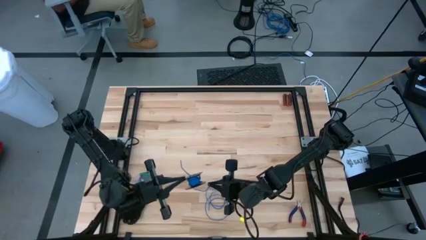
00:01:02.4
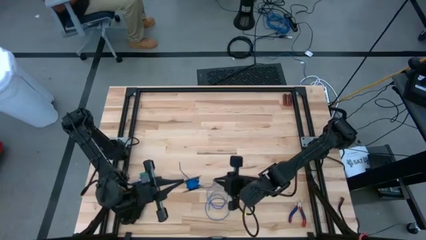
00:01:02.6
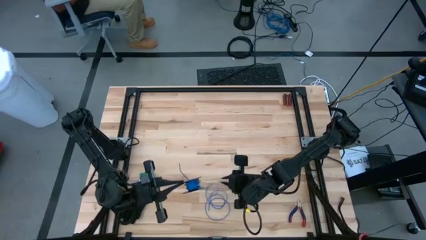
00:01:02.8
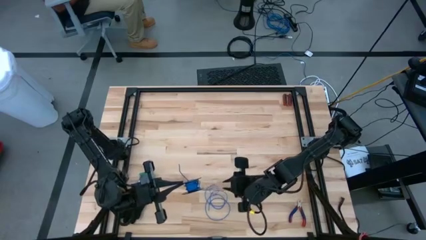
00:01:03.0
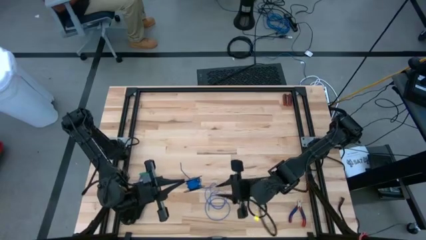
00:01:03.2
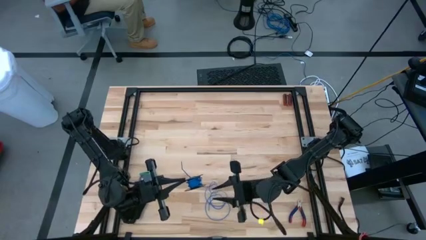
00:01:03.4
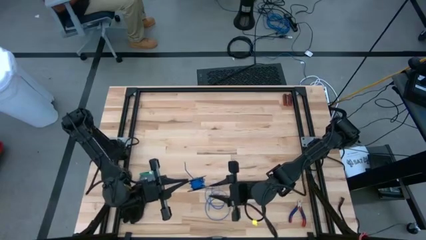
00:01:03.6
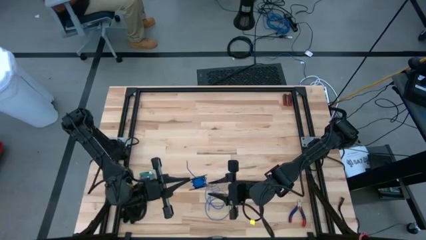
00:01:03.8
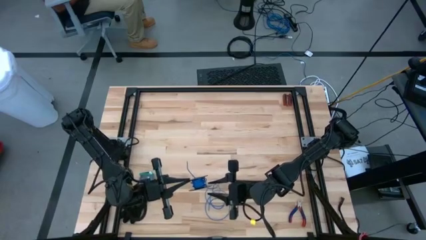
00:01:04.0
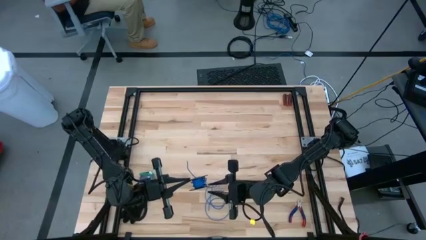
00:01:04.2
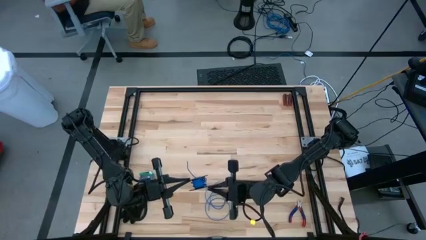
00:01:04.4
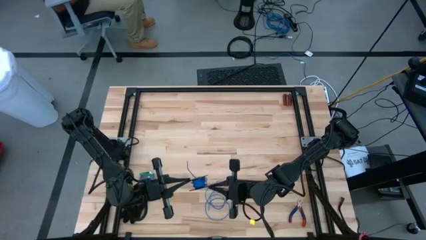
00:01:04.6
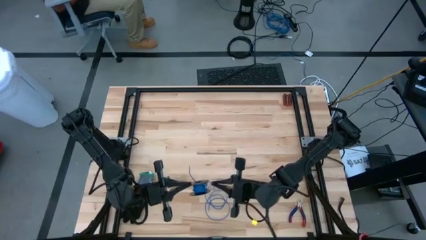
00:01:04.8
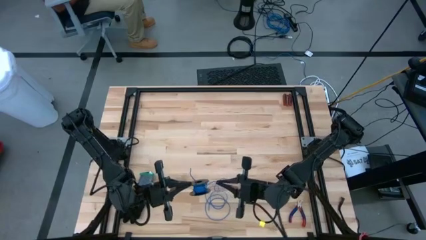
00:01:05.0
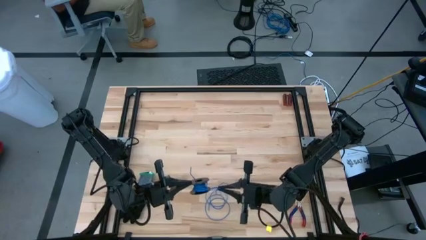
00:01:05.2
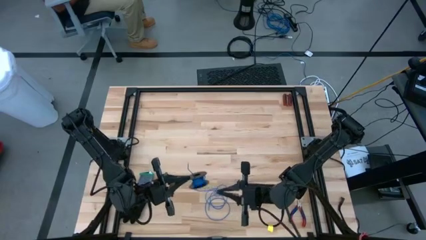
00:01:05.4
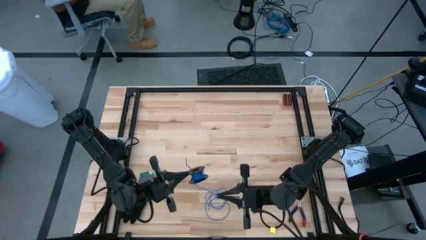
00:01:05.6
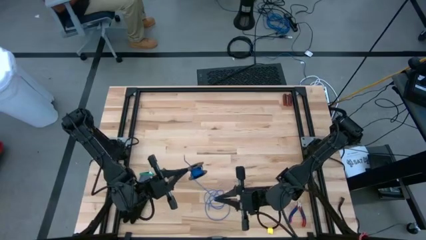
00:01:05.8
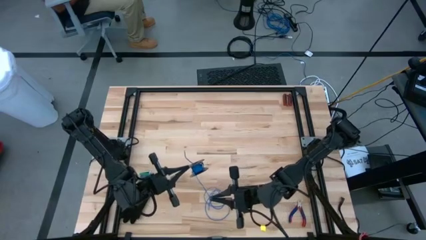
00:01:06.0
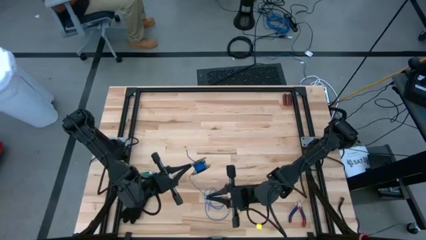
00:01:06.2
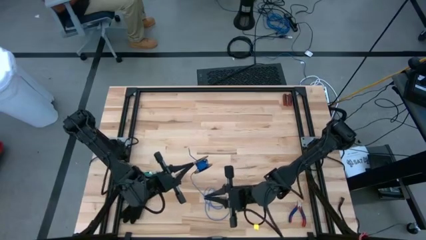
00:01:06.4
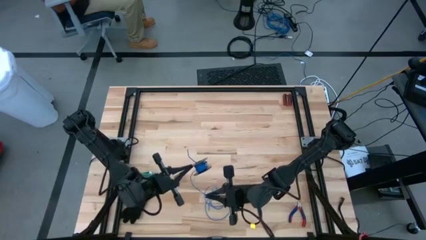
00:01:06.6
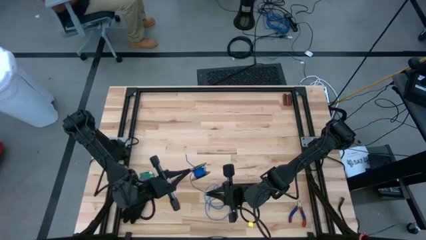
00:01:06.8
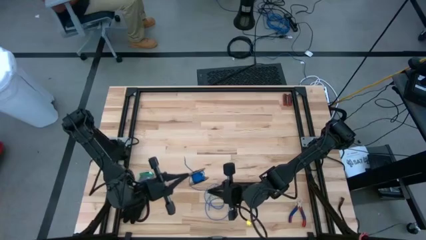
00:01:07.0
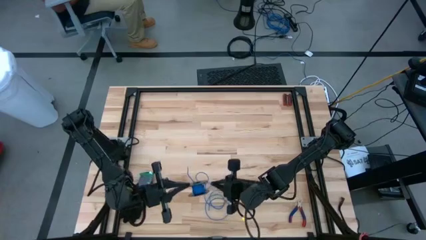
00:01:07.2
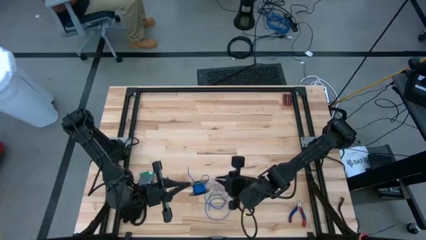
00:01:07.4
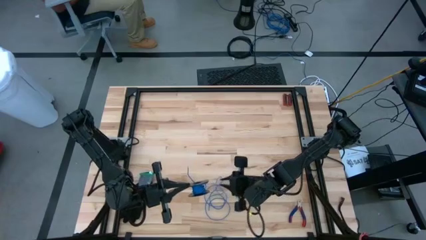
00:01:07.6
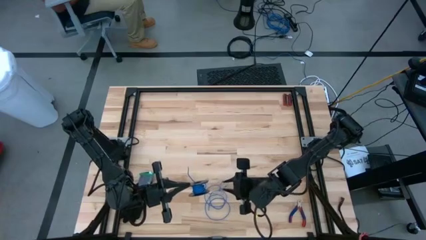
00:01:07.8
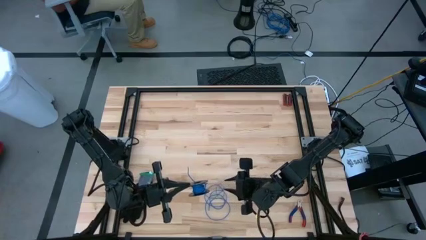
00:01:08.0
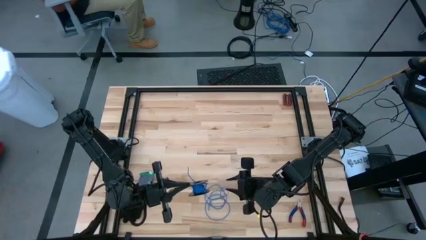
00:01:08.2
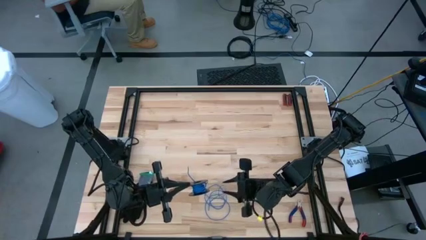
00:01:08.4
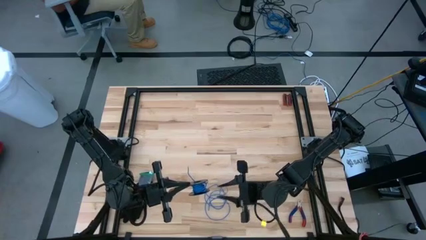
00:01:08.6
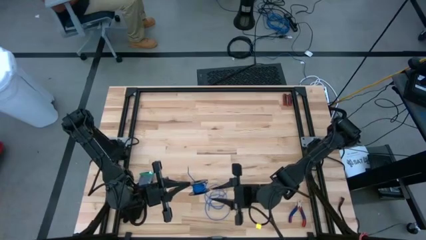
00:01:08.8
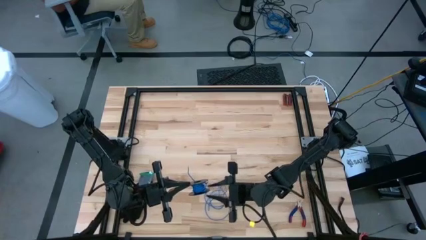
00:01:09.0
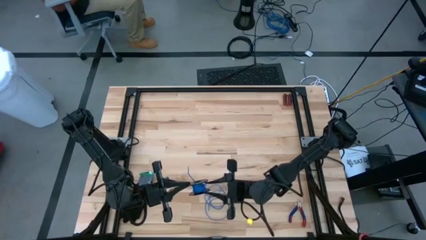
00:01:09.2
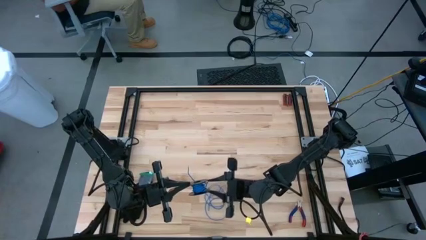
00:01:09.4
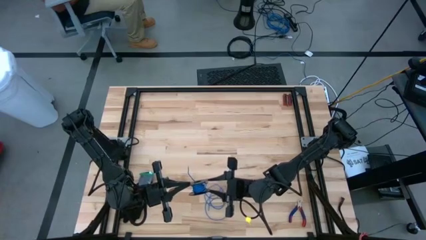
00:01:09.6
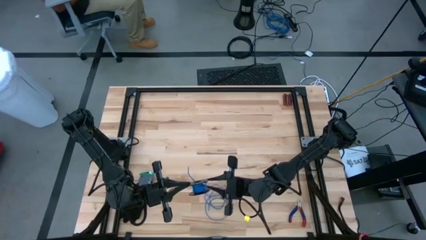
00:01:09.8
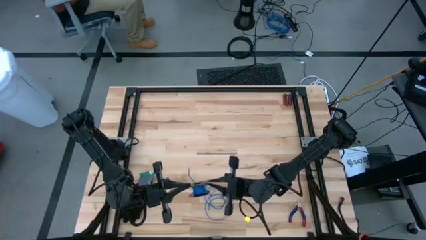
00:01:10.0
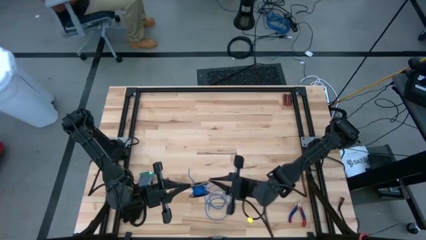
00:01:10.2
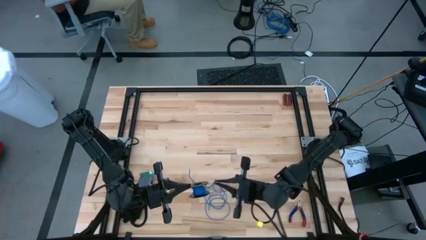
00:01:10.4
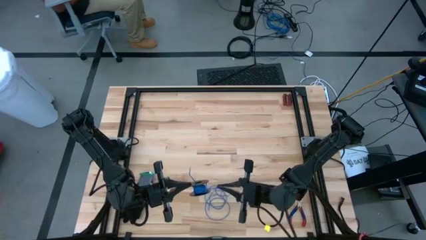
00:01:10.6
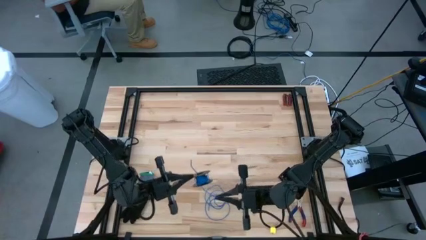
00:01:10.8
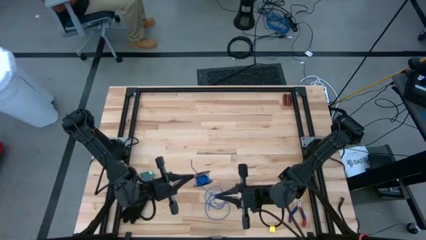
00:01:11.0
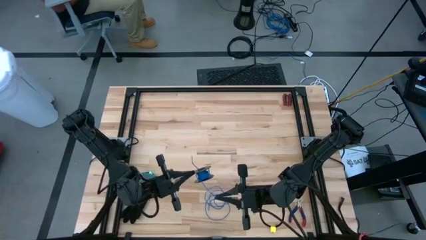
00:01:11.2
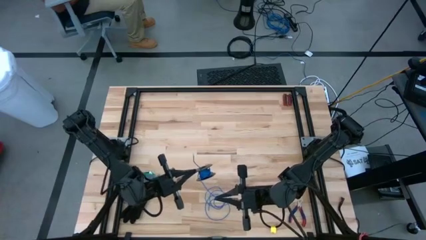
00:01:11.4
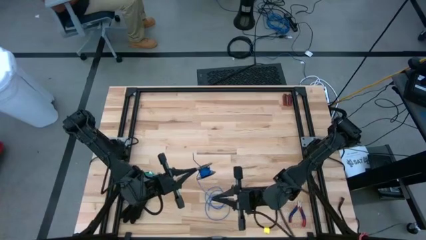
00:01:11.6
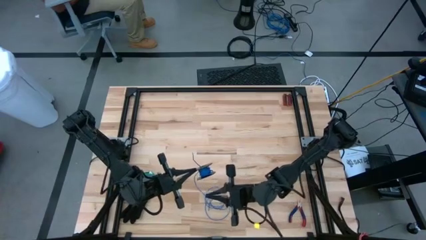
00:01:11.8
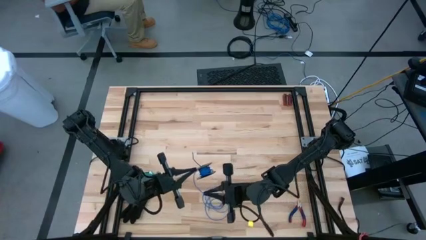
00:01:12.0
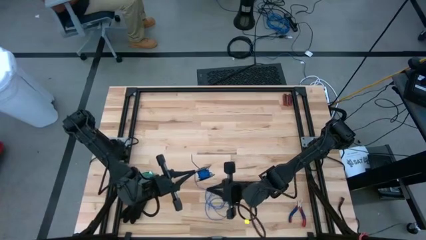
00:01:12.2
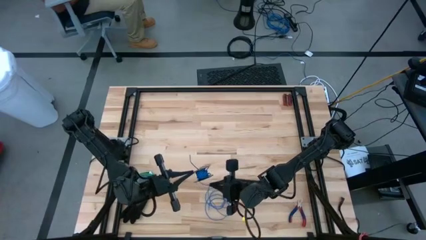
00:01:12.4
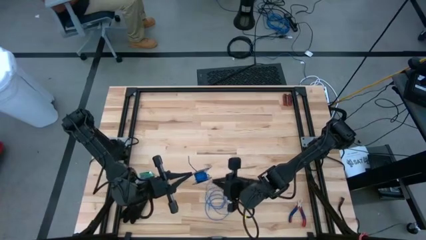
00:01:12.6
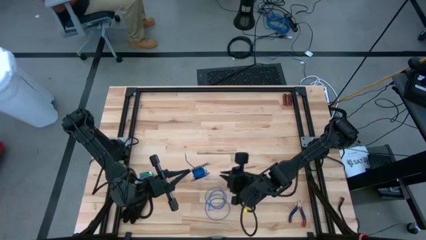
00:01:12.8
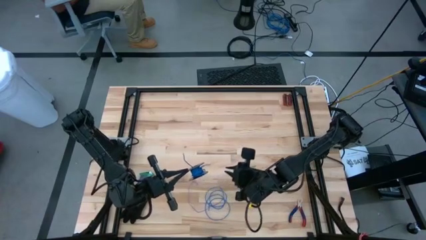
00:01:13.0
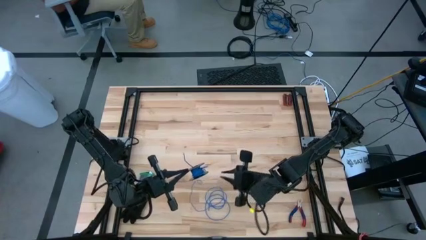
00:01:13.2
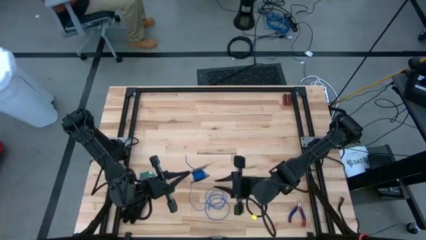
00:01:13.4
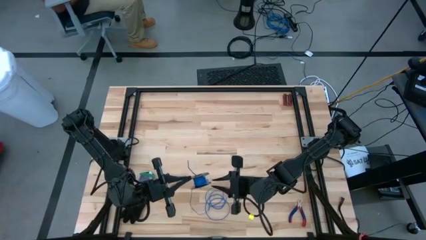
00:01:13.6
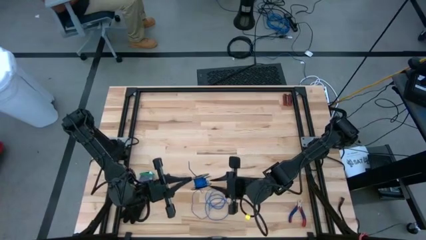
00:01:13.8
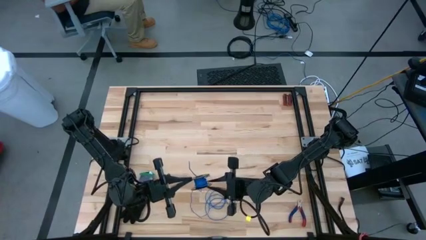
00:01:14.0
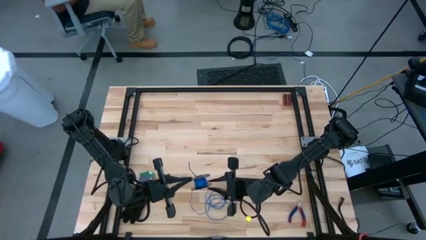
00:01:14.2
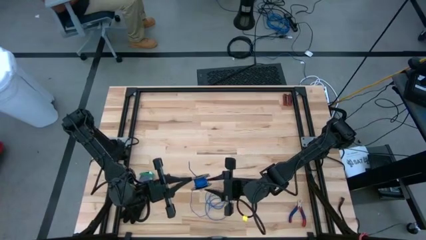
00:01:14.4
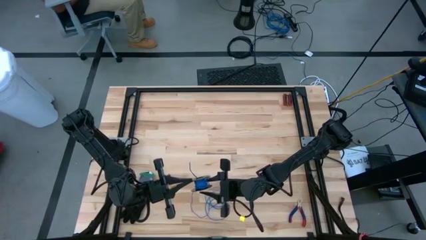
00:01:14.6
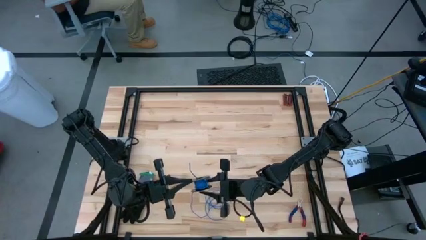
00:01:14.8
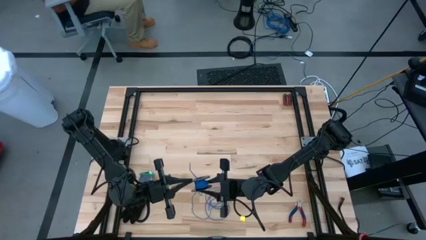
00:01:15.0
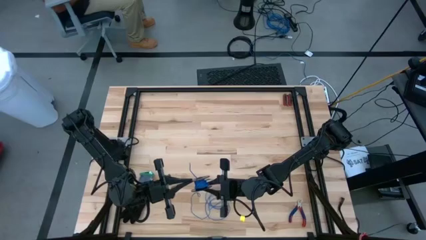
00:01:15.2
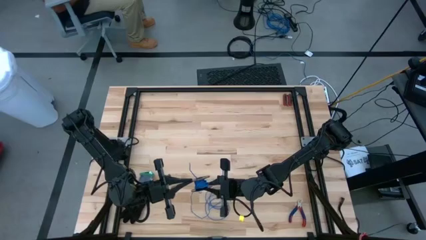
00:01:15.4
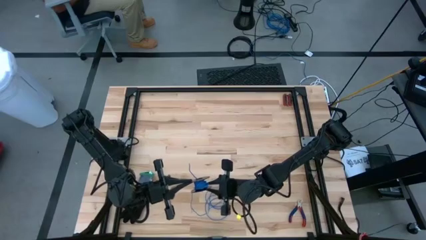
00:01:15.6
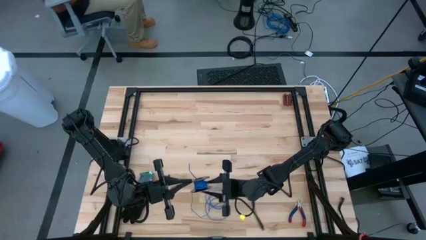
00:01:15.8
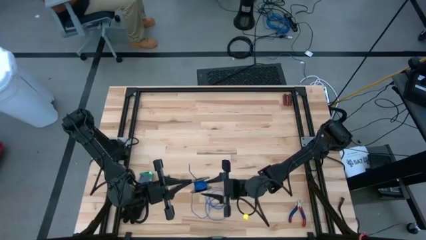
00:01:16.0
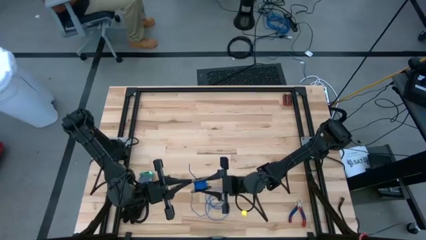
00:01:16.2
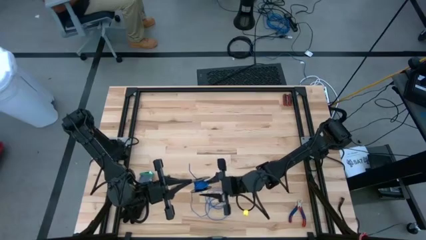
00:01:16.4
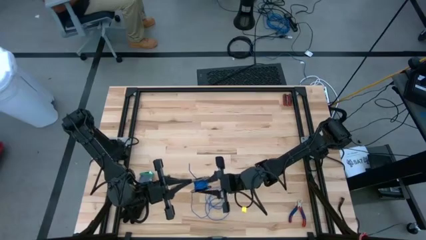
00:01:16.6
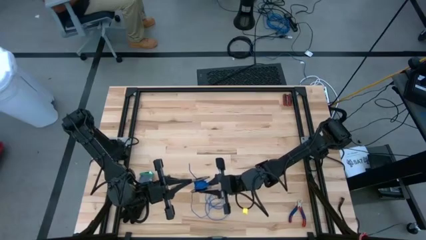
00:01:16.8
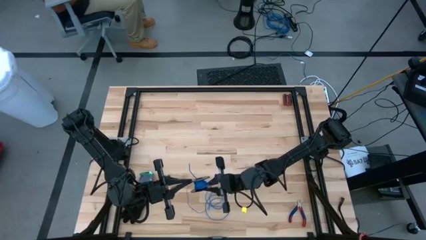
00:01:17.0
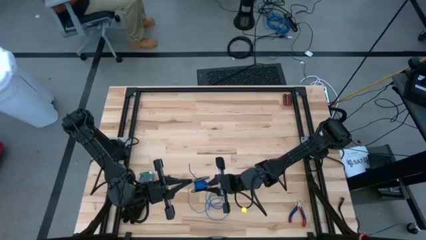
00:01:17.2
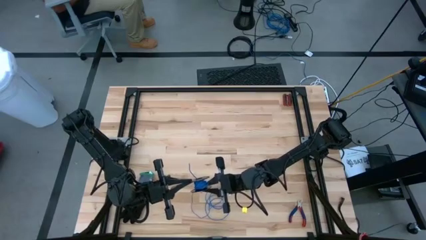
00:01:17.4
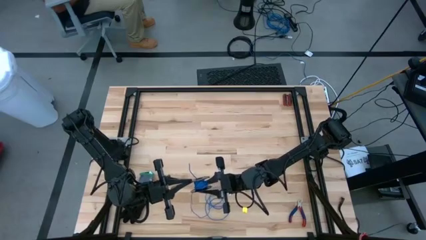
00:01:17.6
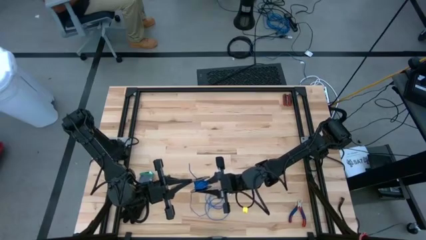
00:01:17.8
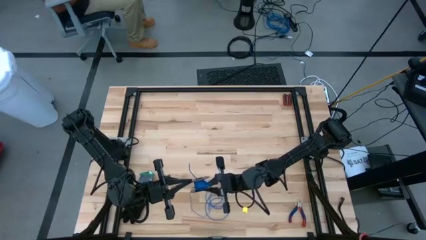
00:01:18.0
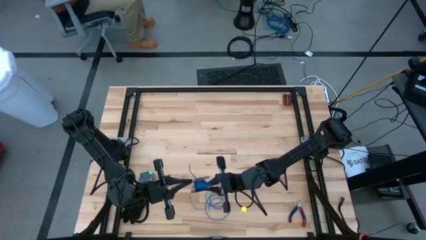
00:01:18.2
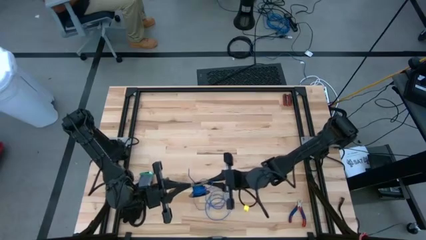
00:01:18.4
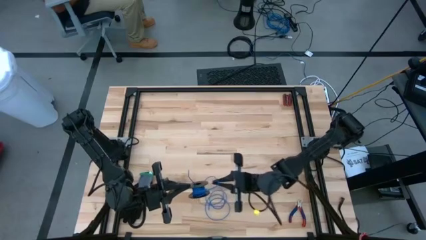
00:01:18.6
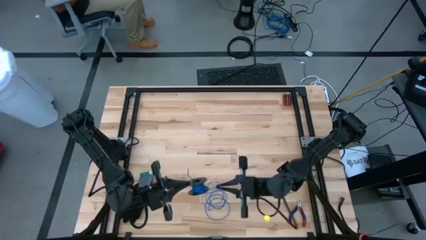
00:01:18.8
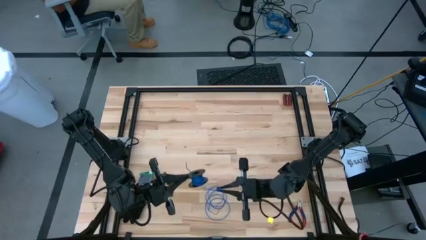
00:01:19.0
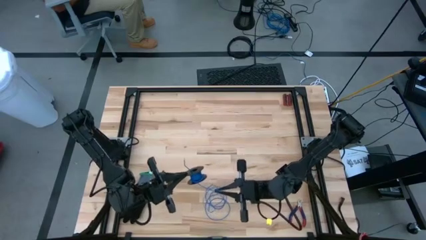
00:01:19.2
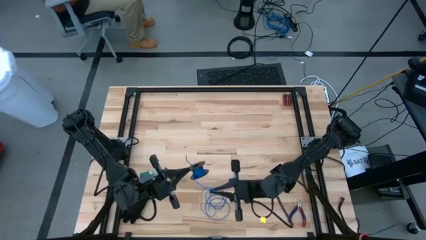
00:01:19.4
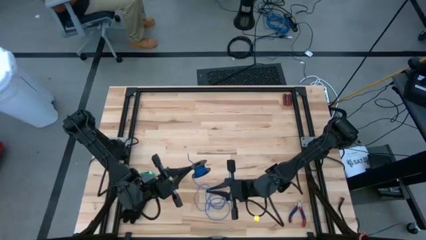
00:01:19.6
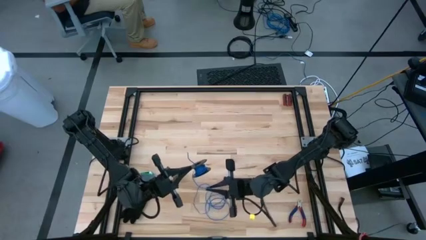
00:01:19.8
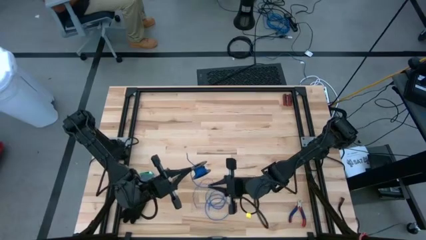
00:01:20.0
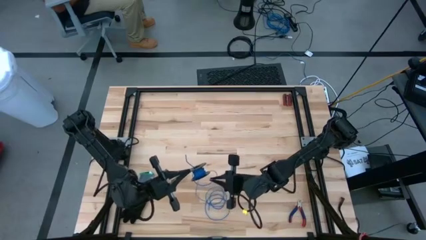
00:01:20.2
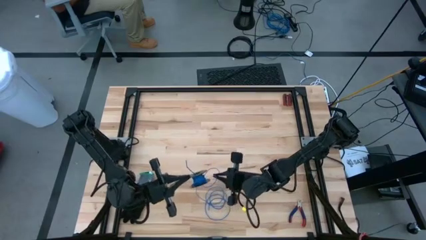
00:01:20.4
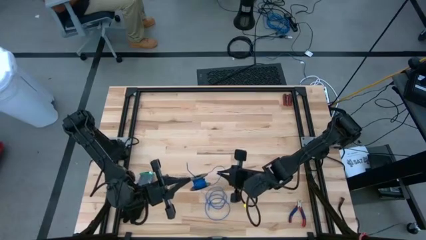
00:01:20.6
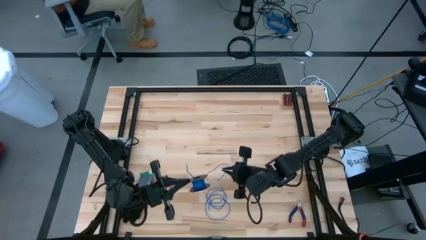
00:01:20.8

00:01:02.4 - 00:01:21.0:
Task: Coil cords
Uncoil the blue wire from the spool
